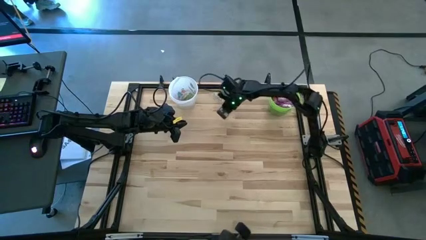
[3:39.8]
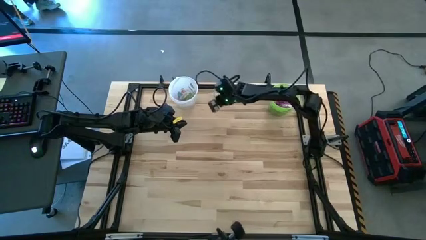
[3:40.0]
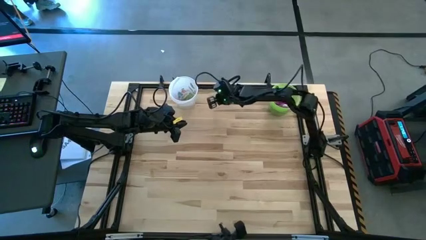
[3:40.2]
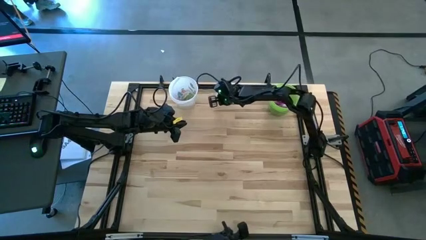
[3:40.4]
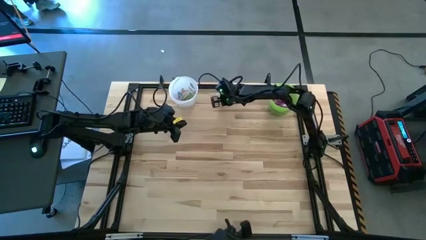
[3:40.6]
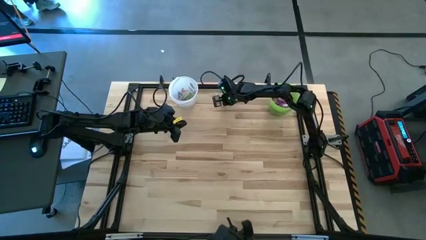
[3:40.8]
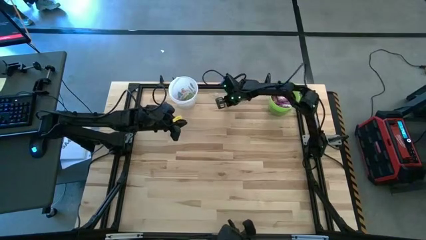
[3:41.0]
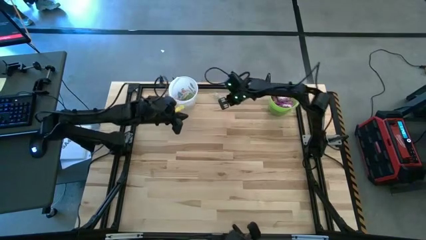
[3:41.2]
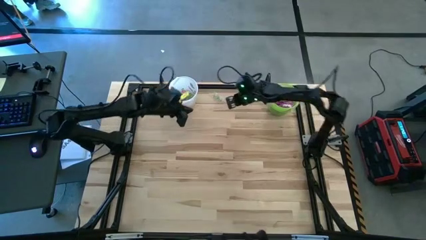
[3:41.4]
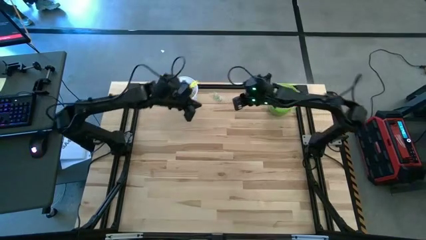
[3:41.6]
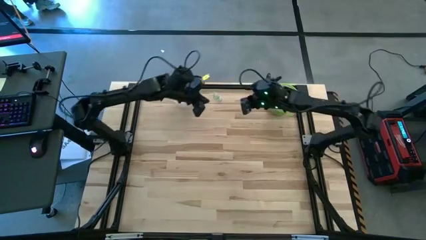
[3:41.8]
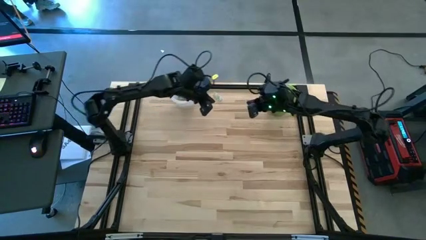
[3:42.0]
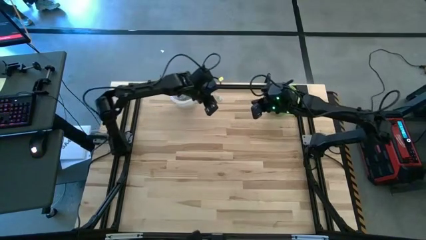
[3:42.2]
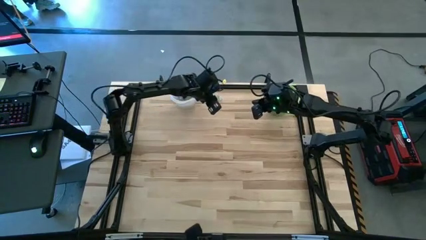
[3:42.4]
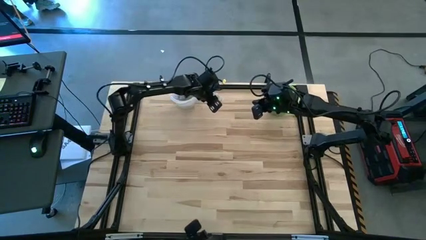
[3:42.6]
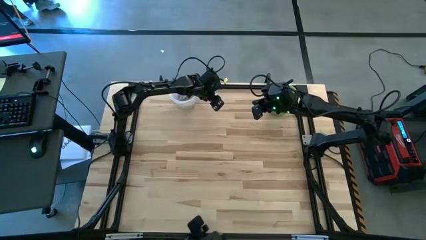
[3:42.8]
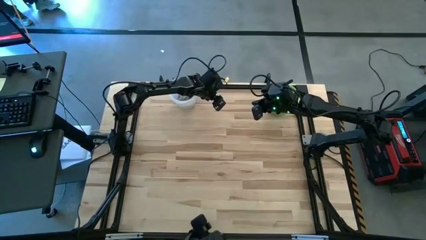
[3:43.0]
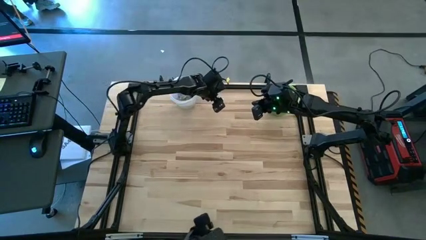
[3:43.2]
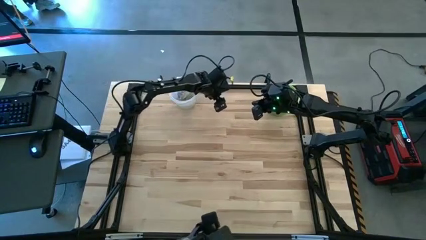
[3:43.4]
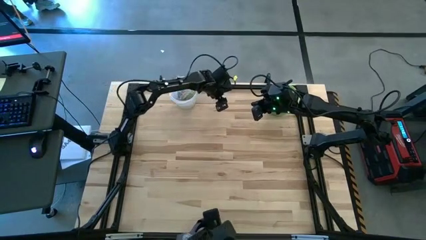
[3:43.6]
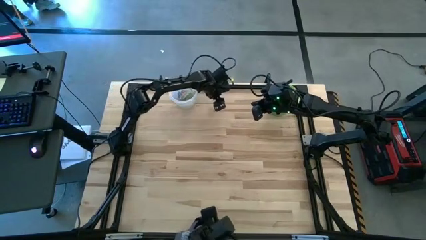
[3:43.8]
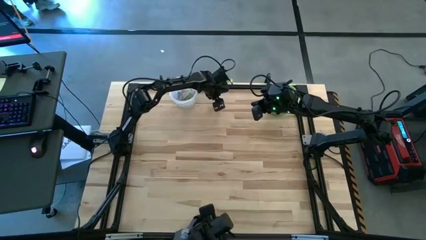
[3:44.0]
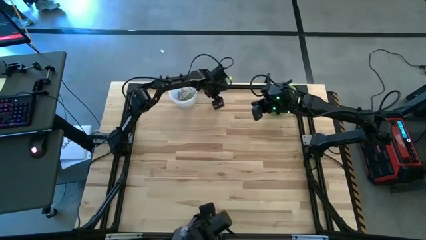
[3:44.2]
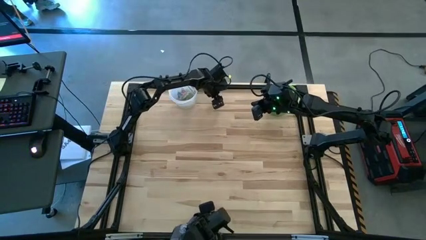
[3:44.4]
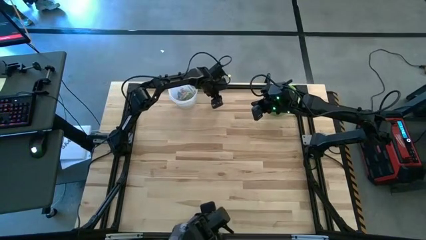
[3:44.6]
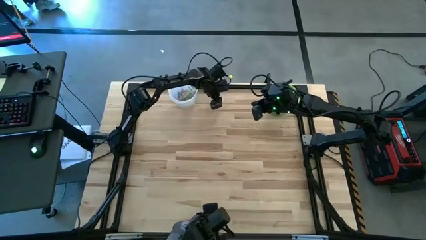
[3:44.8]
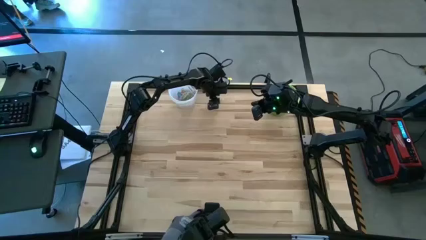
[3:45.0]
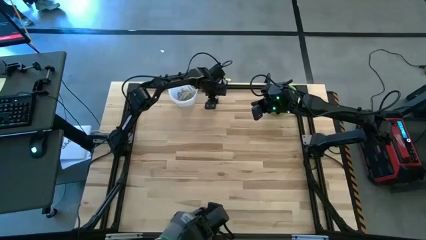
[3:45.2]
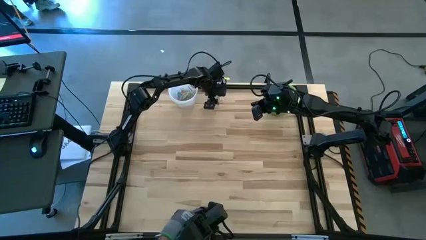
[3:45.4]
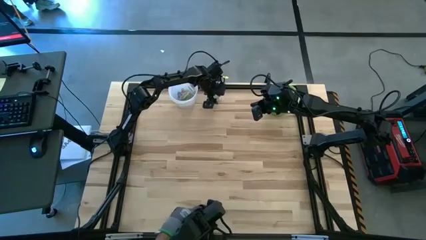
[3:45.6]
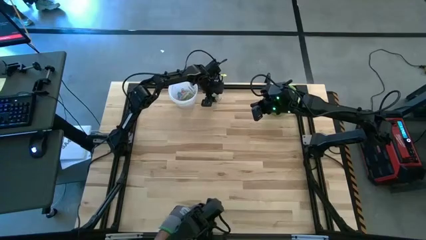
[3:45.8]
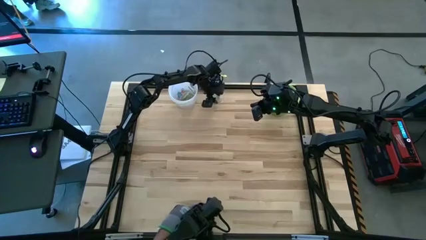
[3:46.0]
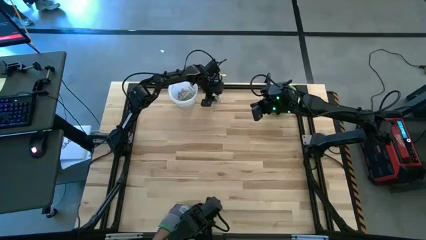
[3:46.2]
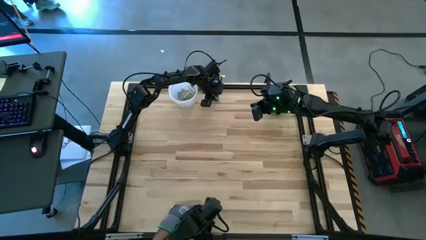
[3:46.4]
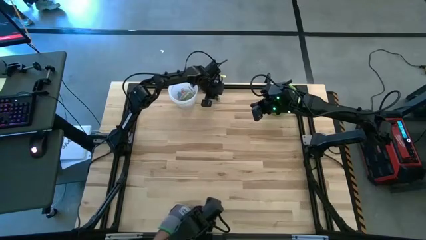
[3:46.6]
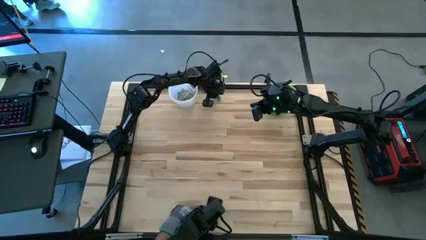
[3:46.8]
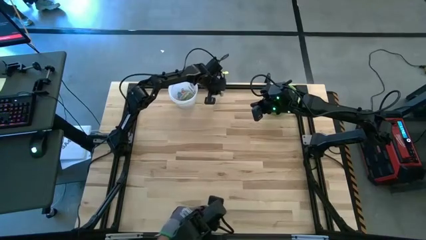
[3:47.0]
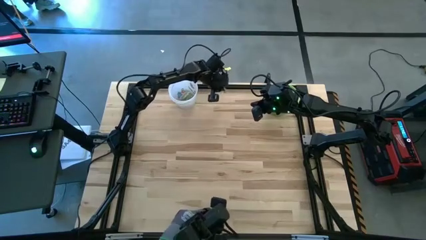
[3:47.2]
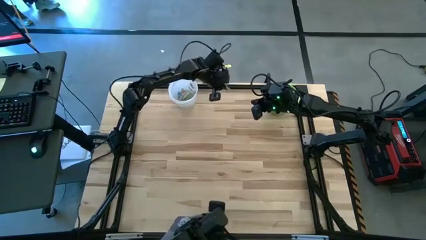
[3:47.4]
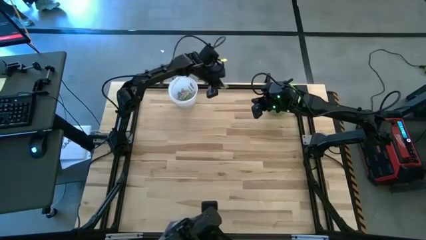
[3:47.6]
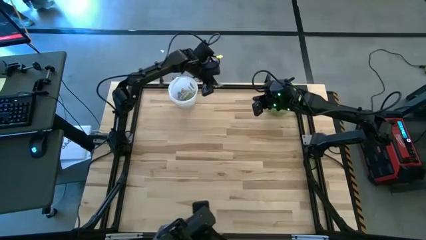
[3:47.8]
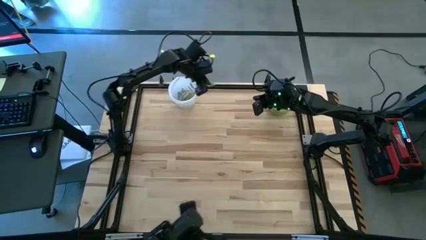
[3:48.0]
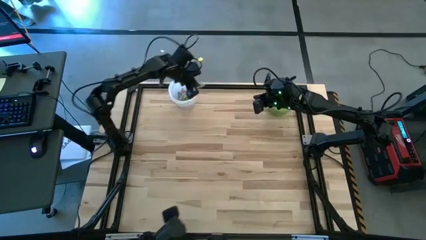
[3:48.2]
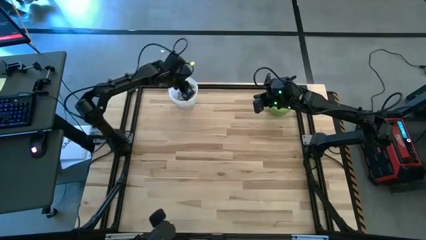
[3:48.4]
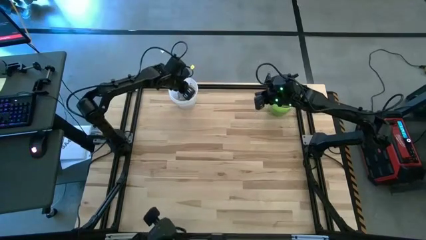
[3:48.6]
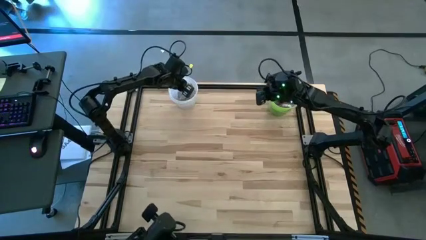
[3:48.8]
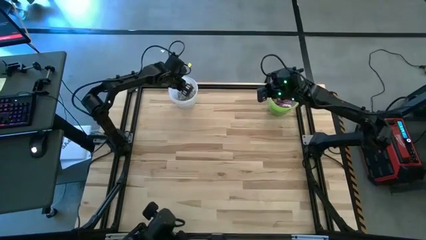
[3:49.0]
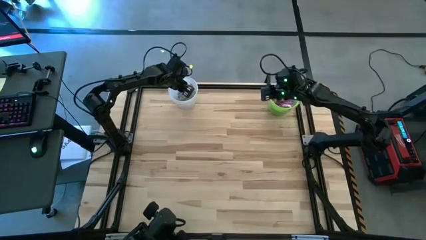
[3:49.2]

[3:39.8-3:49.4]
Task: Sort candy by brand, put in halloween buckets
Put the green gummy into the white bucket

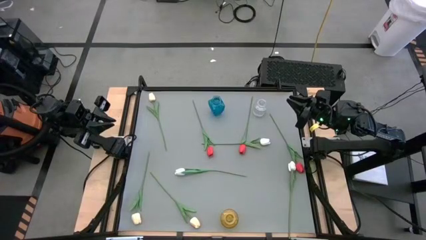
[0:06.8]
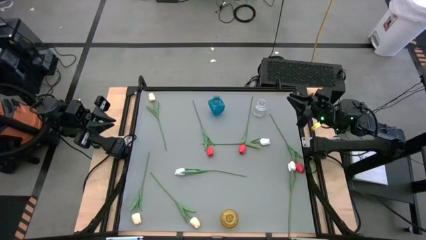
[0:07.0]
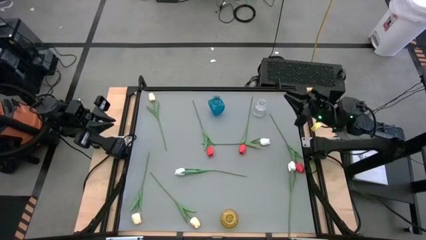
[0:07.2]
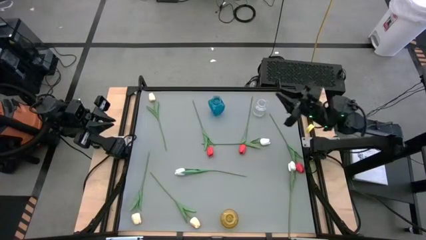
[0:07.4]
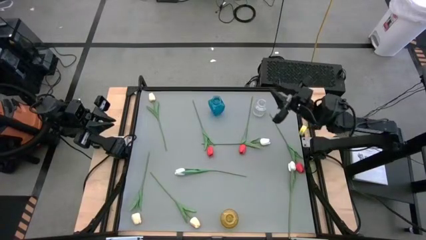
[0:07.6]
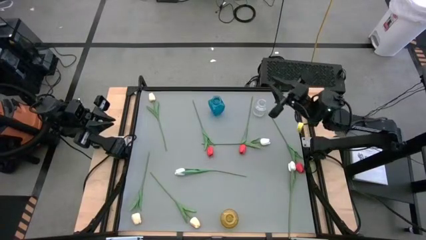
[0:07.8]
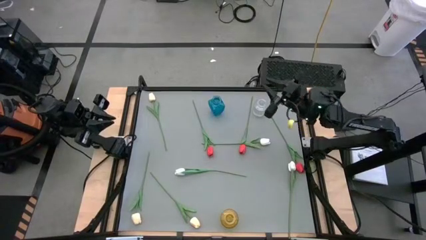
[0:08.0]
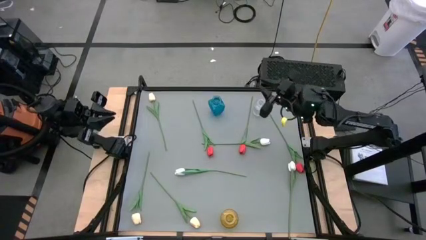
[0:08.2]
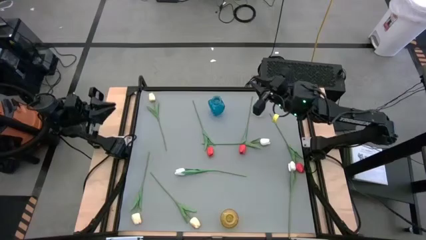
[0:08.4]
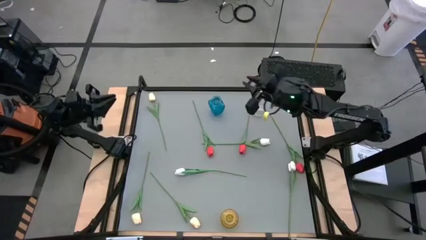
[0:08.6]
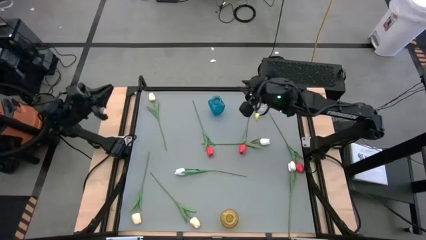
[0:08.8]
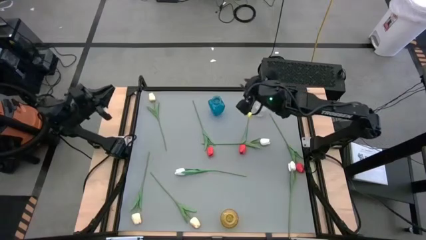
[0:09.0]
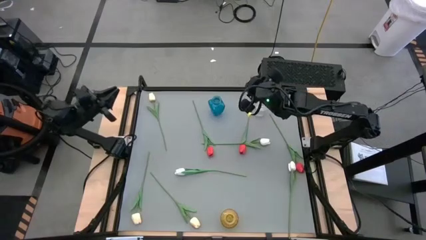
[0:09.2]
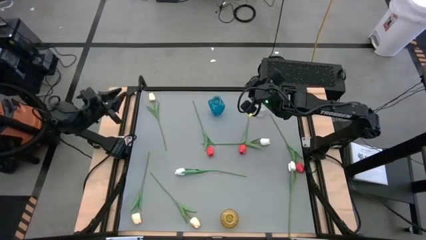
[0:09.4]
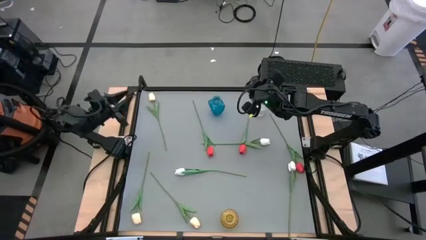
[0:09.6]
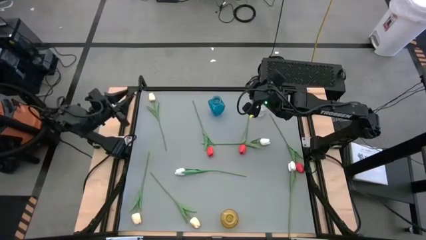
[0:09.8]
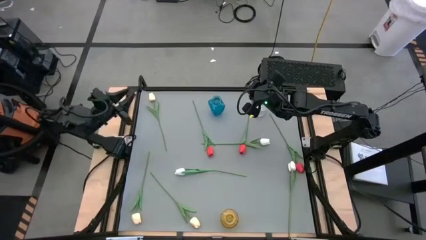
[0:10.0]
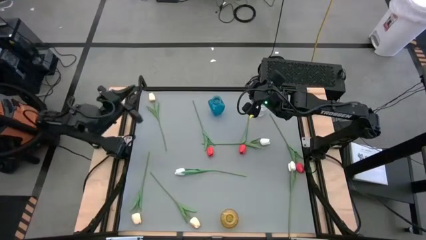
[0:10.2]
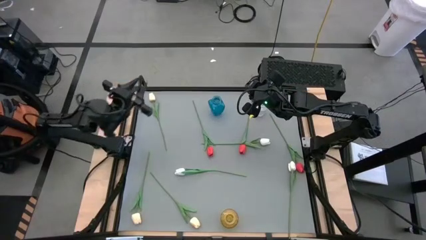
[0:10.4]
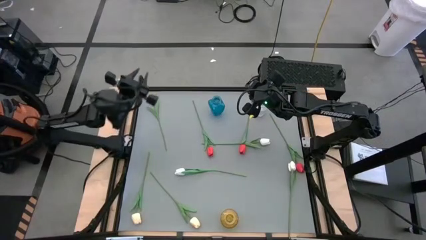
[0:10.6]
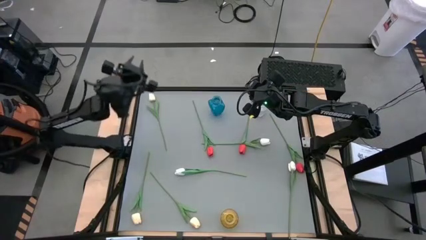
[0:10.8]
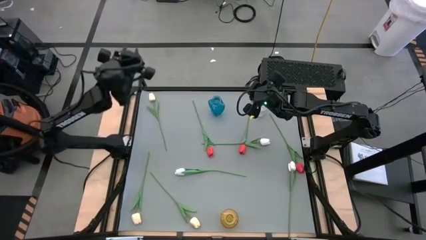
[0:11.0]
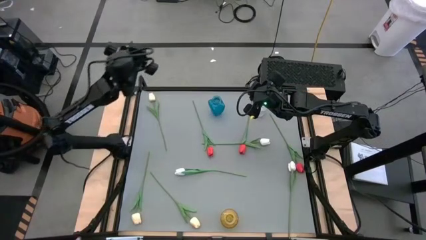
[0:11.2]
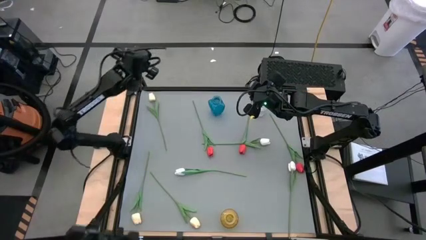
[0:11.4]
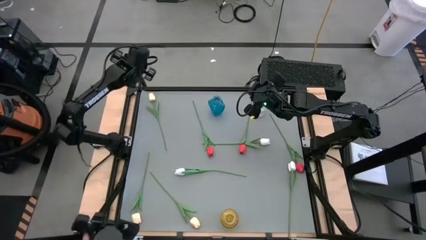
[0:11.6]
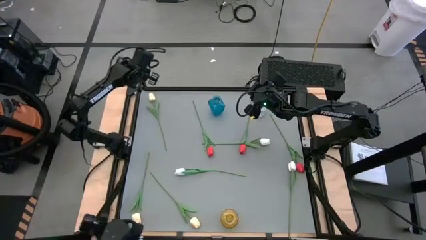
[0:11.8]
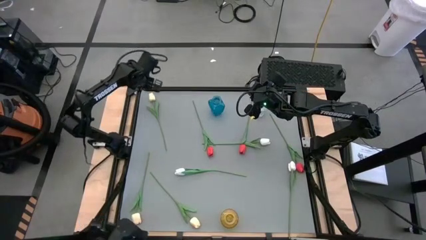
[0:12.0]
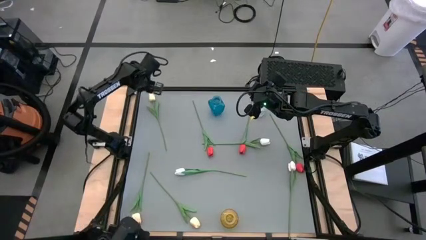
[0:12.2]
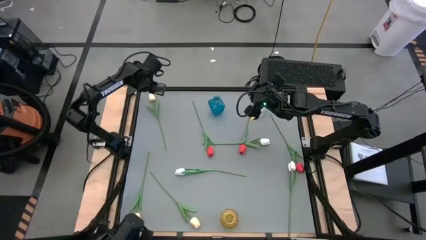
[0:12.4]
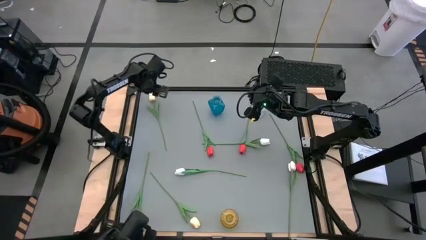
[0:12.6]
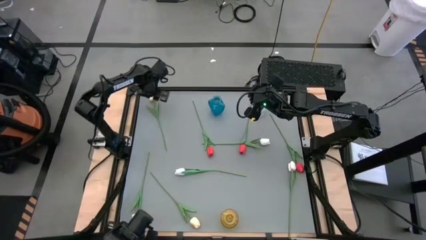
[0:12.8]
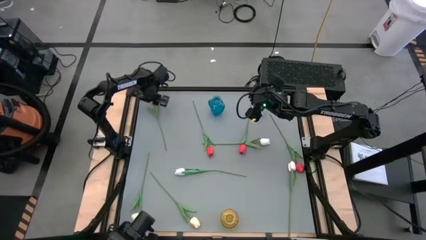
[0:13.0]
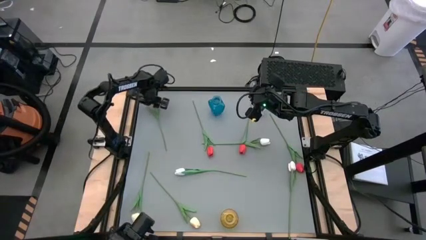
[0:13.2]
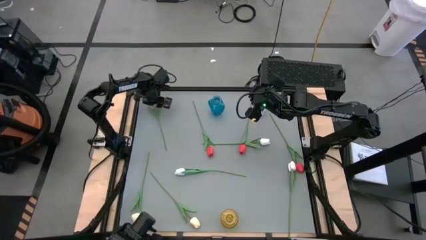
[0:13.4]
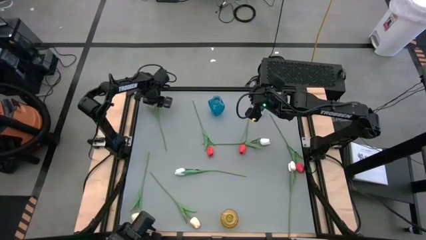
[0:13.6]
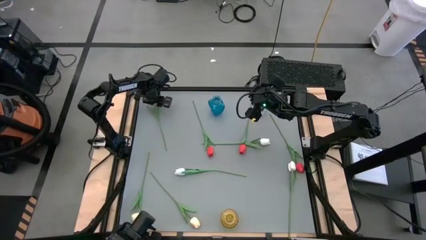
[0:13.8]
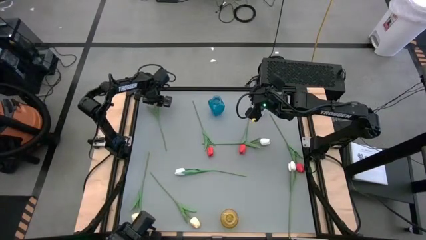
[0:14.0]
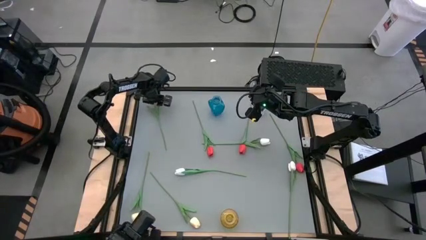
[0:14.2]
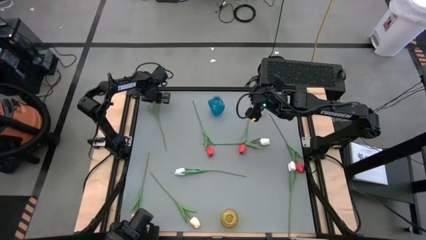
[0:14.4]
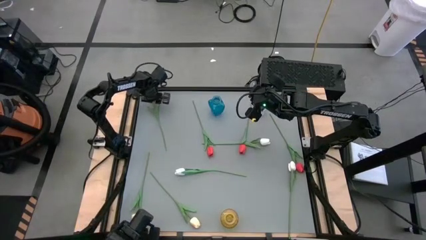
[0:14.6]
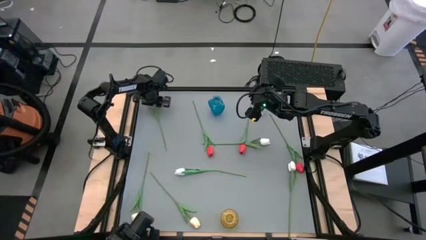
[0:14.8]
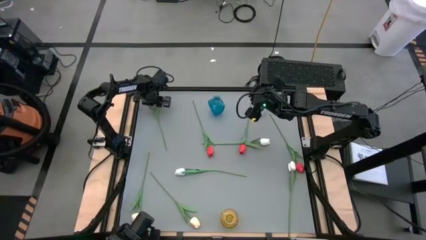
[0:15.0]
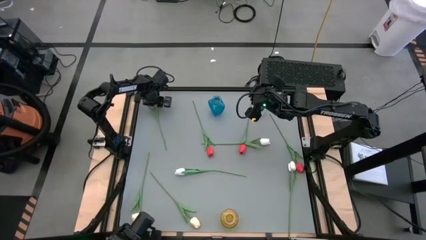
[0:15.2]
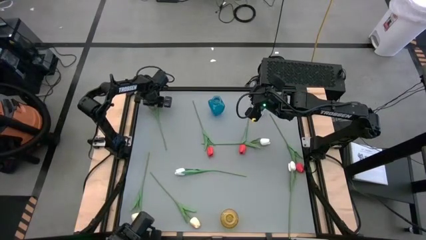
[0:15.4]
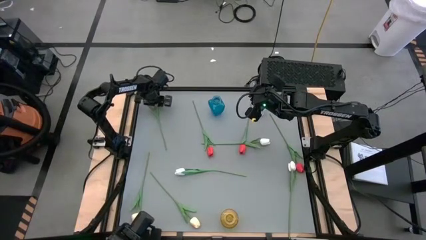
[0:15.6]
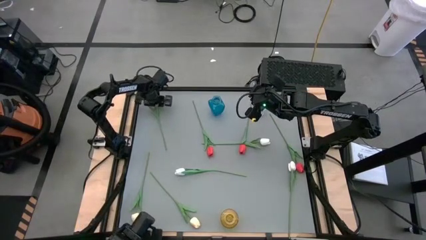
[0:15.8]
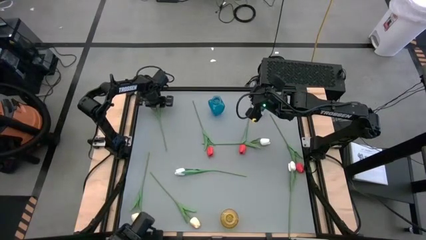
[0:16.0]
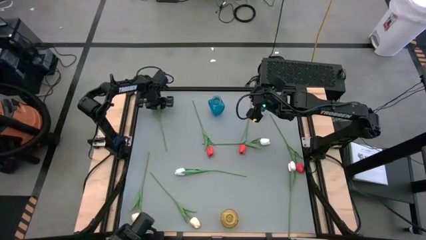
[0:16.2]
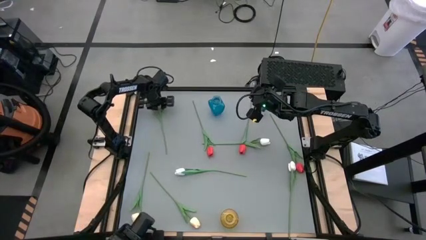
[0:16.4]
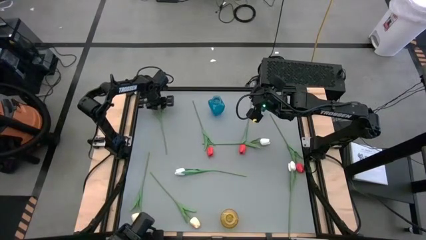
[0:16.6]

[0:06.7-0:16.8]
Task: Sort flowers into vase by color
Put the top left yellow flower into the blue vase
